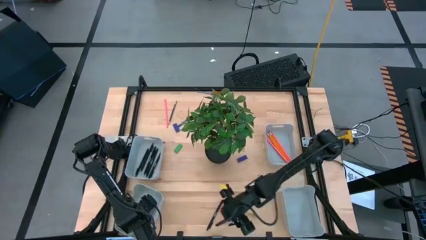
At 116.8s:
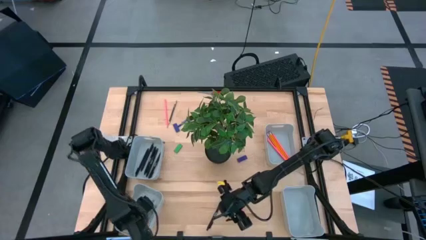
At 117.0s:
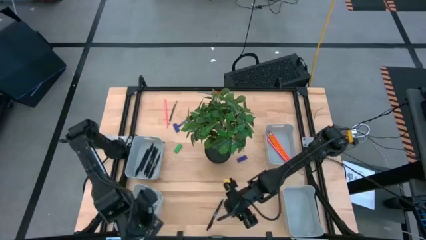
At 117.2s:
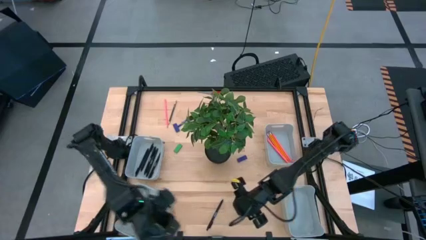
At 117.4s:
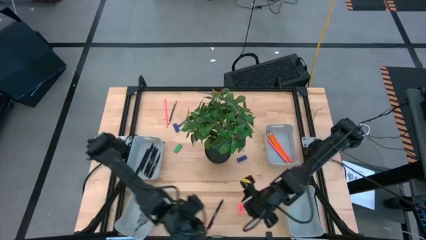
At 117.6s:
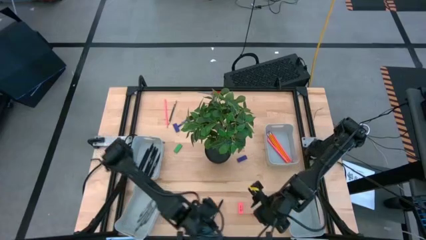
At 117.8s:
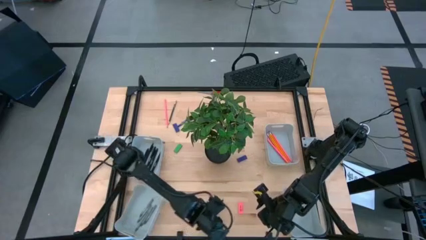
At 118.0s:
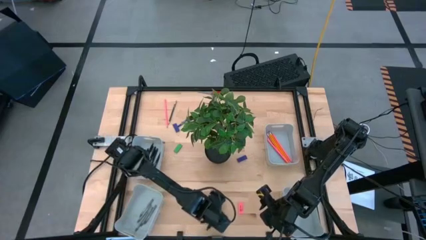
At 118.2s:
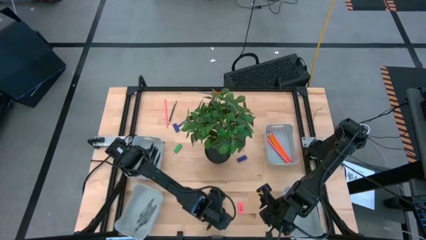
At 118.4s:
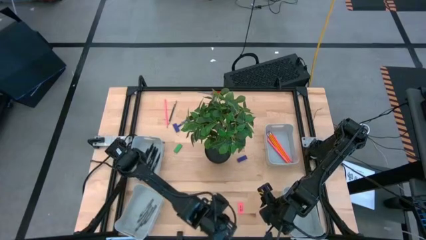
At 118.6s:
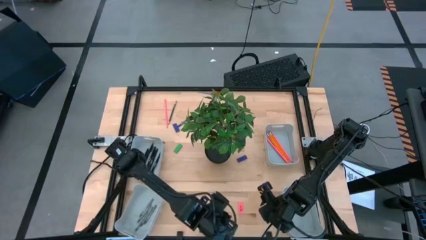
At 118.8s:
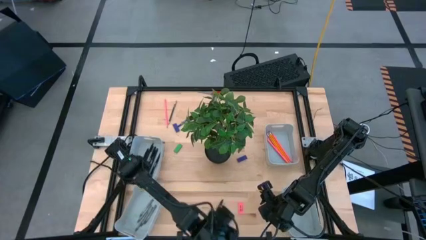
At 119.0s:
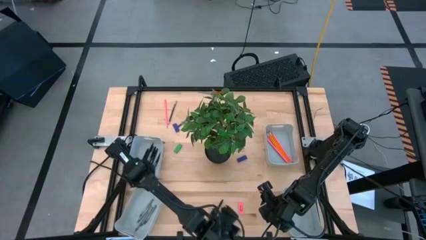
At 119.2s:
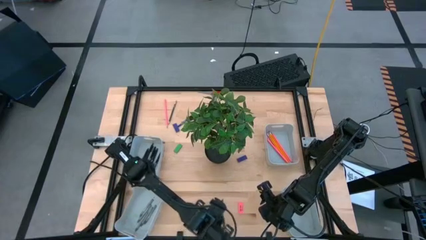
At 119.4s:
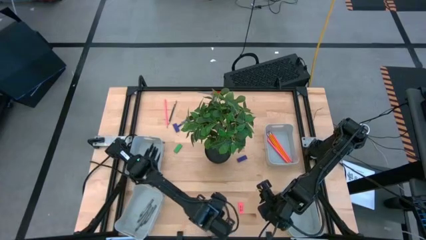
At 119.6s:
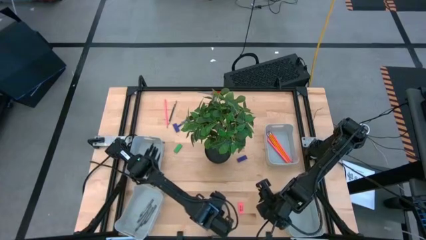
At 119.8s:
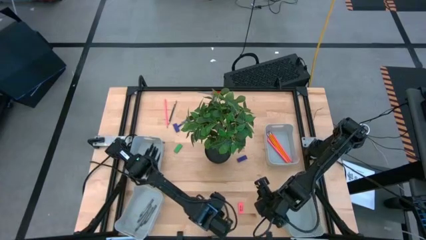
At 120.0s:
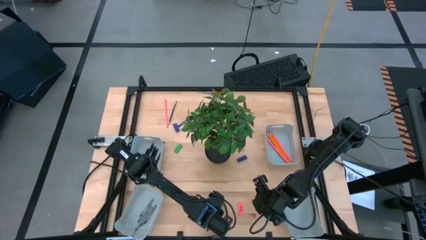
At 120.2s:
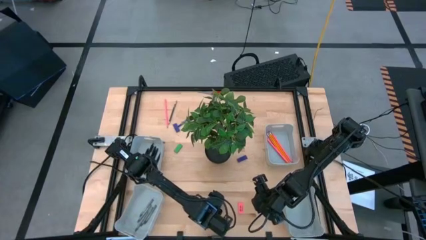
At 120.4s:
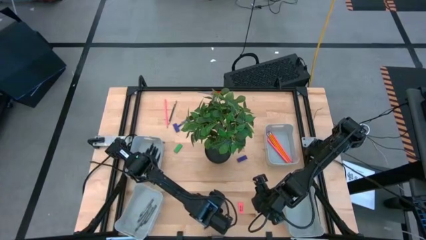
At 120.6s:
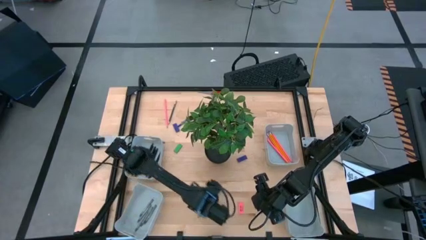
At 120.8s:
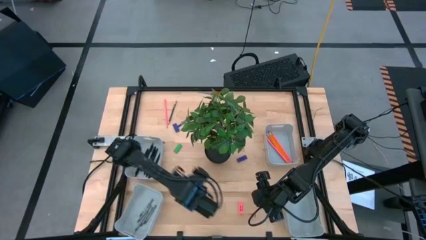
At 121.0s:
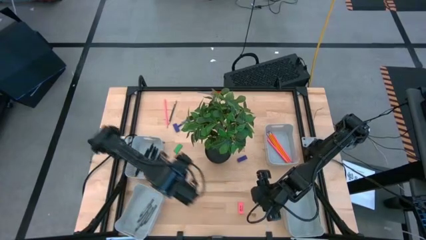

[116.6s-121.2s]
Task: Sort crayons/erasers/pens/pencils in bins
Put the black pen into the top left gray bin

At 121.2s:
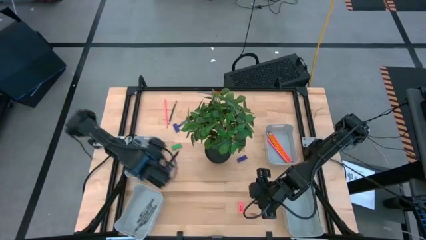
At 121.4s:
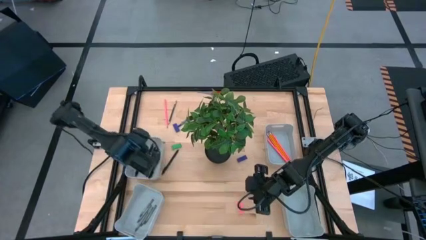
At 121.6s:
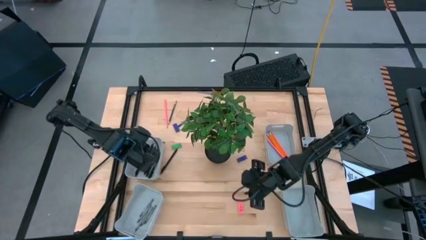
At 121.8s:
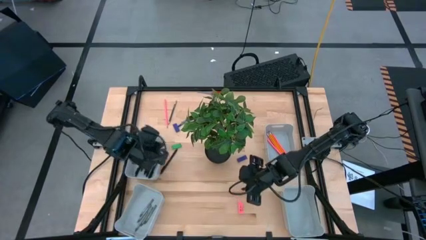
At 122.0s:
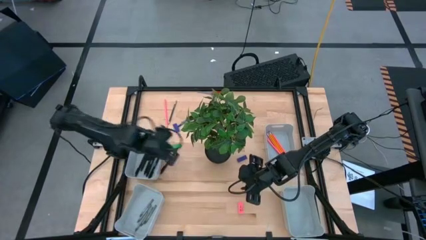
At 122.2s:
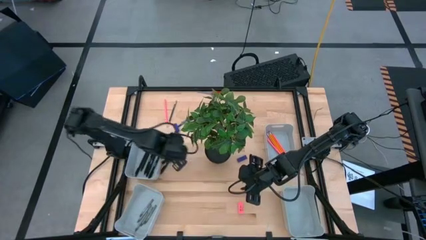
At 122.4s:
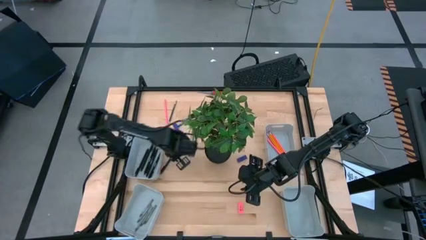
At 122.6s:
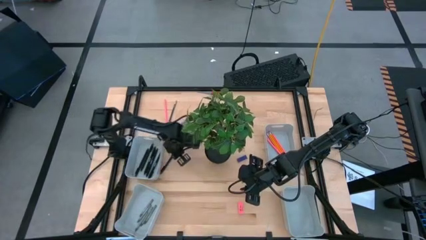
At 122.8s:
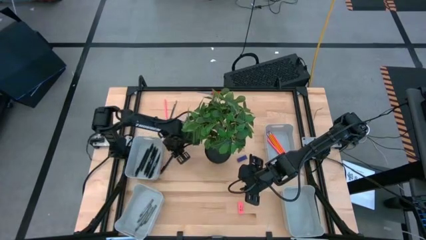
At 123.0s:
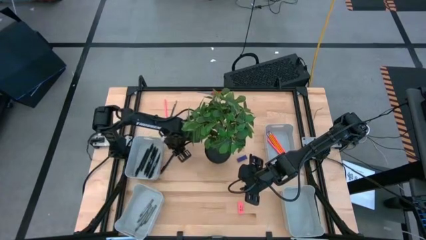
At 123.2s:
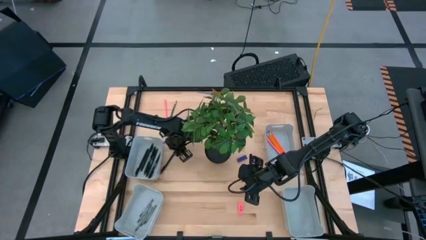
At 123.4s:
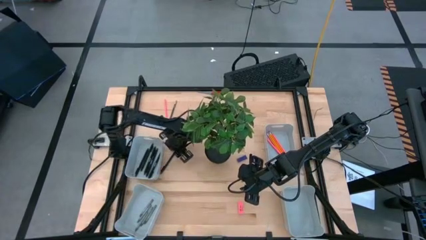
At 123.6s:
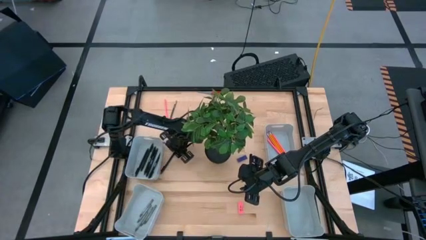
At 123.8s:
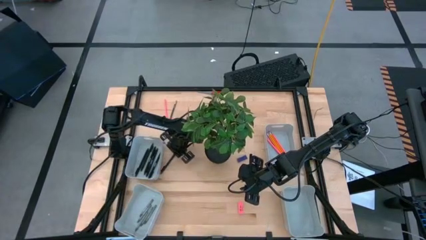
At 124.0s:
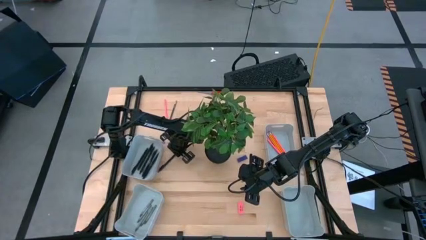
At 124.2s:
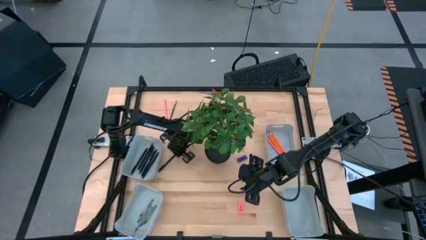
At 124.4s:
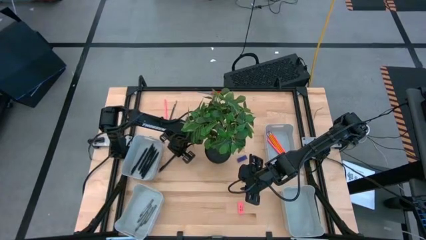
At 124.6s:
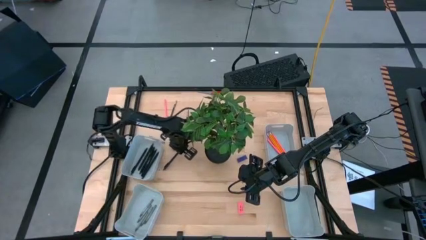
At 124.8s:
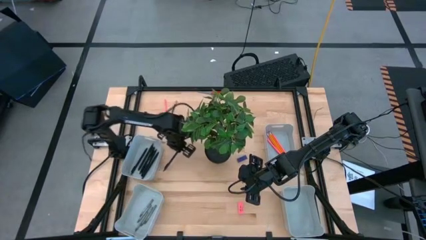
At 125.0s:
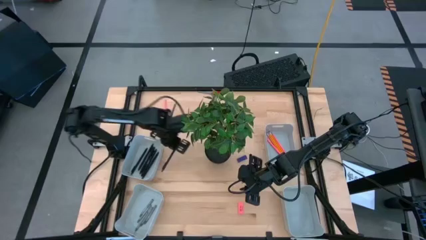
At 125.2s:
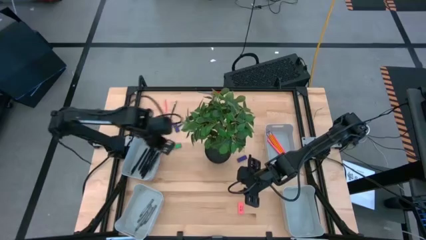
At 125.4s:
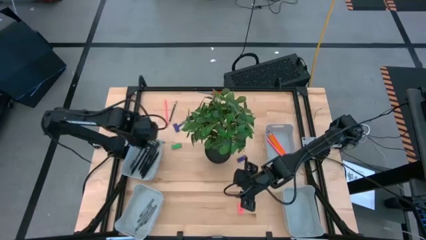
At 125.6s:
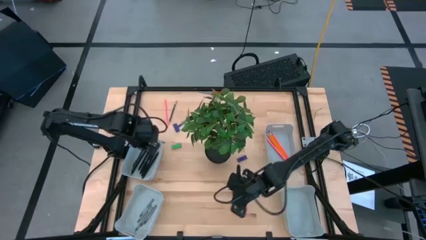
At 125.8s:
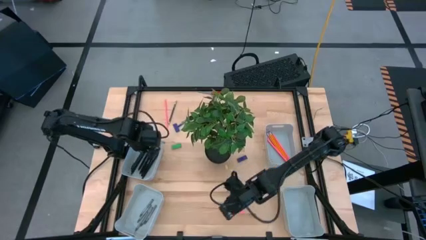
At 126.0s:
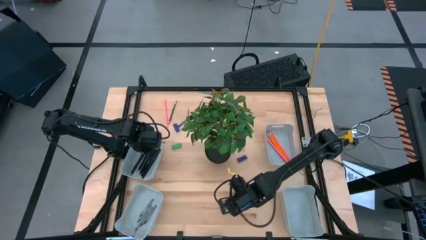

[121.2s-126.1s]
Put the black pen into the top left gray bin

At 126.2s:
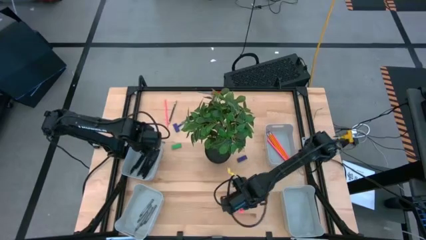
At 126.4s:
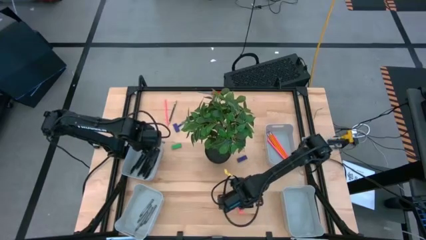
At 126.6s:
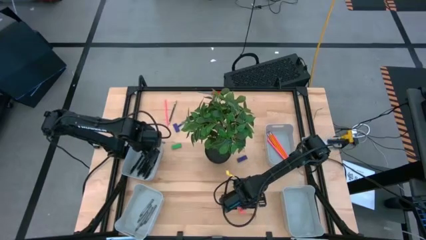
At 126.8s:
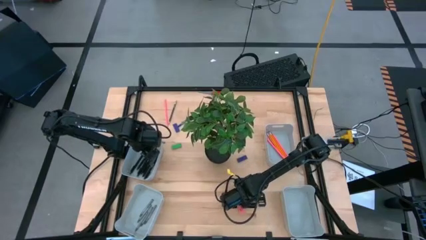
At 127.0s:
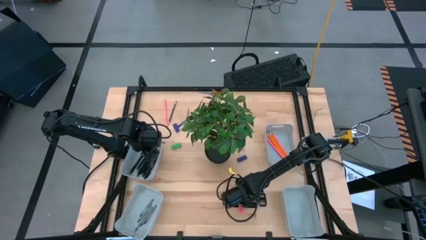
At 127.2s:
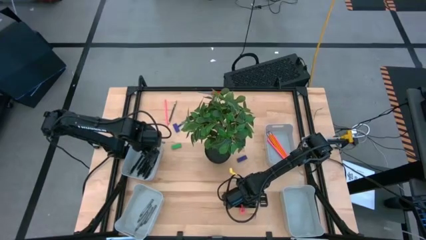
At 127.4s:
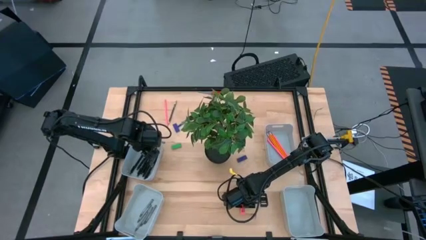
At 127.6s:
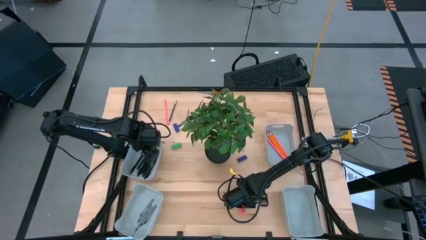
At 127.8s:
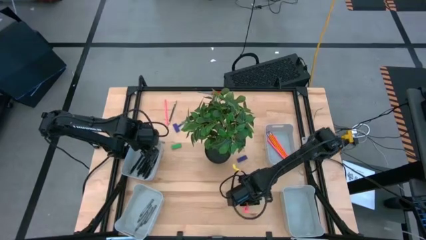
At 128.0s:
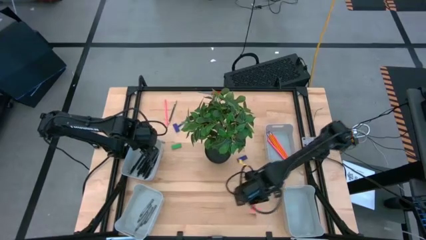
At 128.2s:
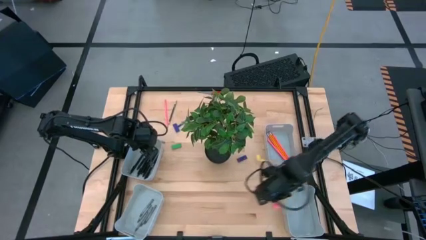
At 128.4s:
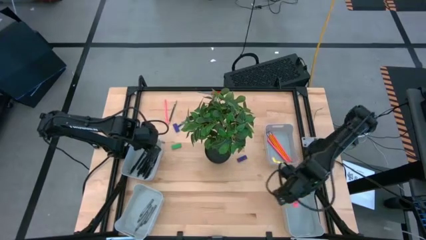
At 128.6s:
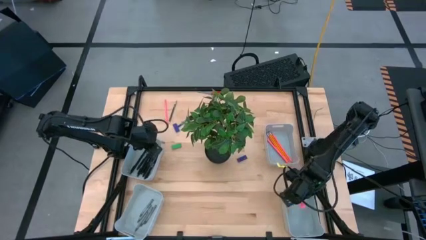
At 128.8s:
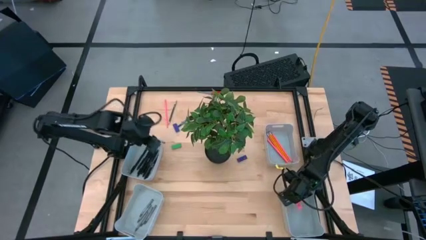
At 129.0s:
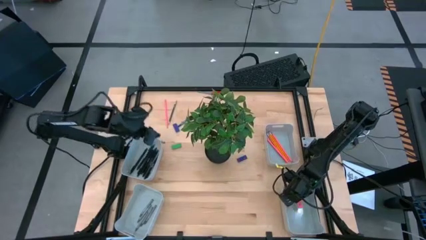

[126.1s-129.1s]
Put the pink eraser into the bottom right gray bin

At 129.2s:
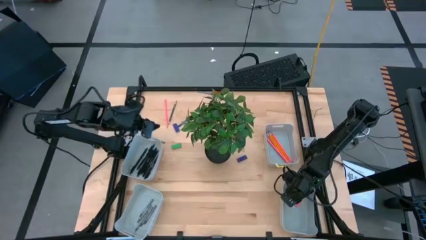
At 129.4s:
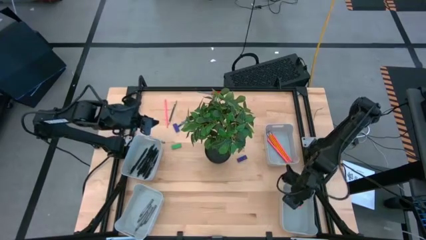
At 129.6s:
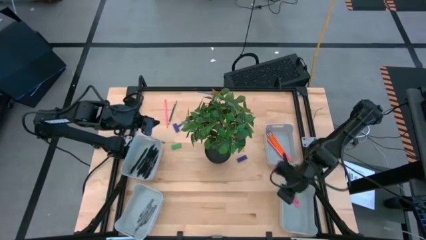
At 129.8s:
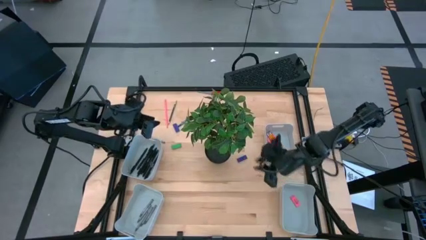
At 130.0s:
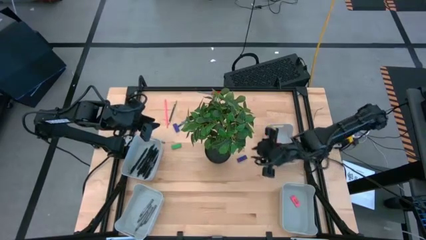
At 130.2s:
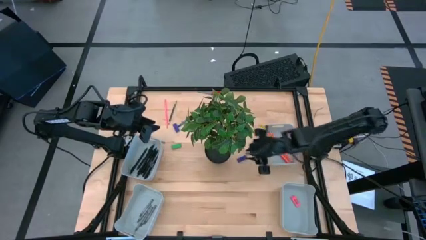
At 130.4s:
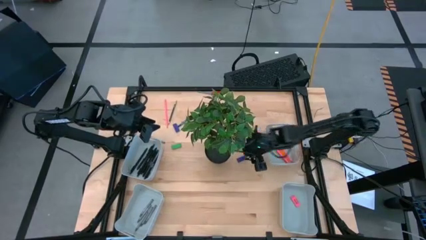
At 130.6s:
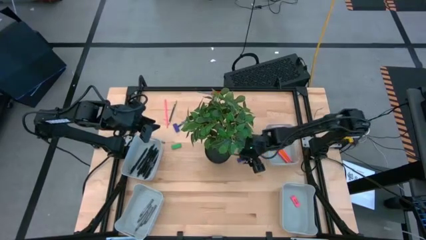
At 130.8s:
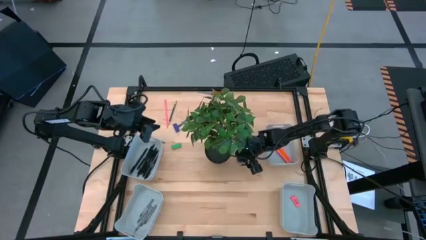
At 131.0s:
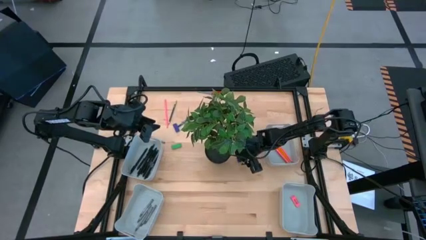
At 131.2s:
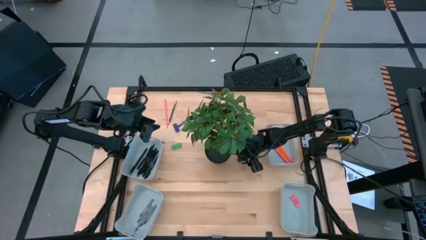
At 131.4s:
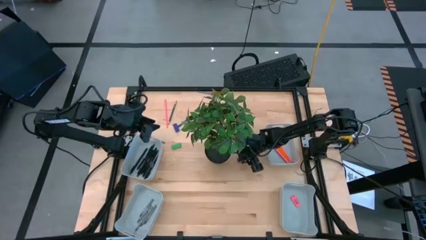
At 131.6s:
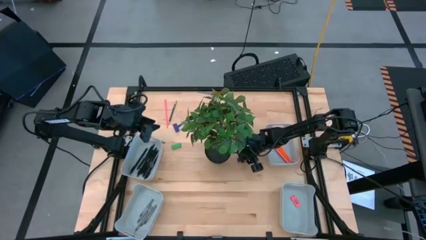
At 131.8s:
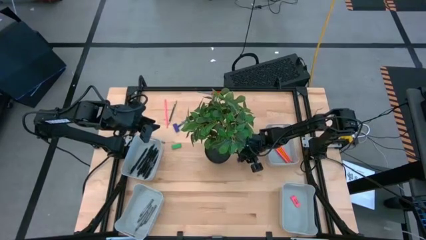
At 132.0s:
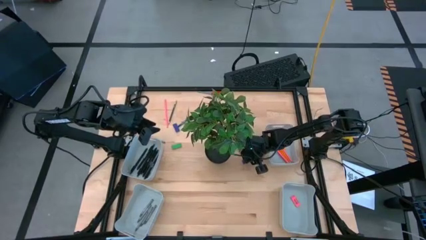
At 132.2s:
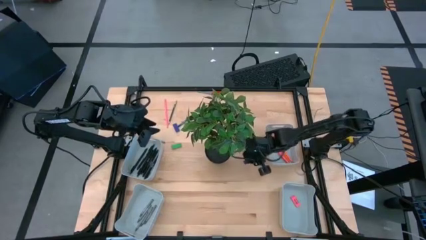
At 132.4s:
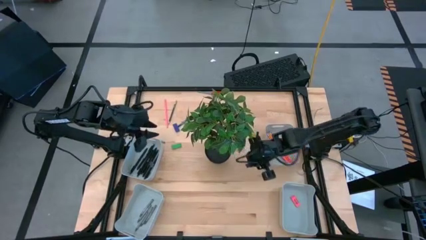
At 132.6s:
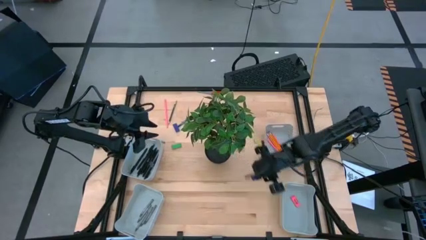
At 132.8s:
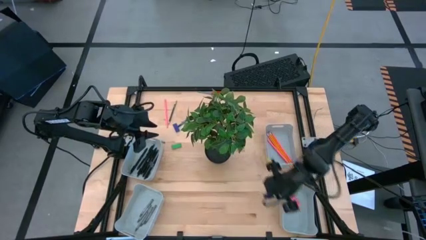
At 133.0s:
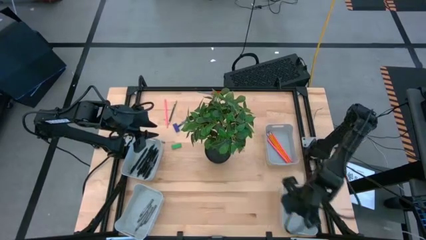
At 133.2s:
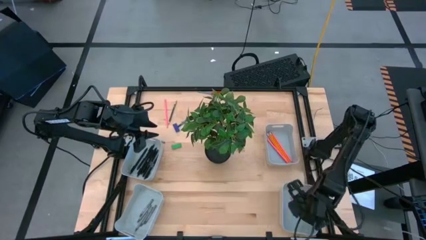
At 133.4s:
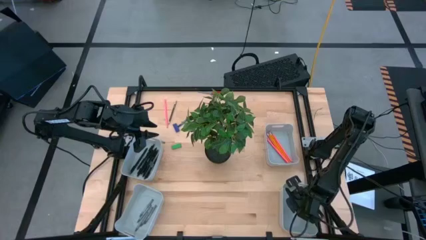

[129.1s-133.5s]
Put the purple eraser into the bottom right gray bin
